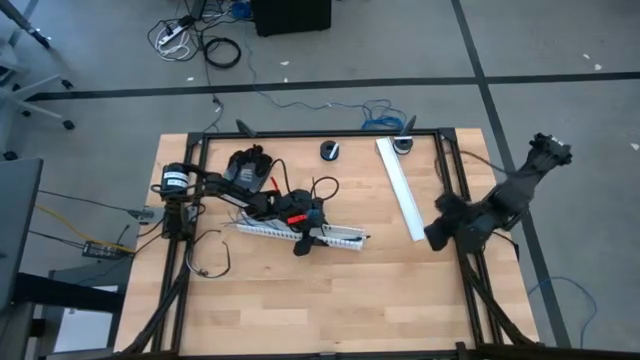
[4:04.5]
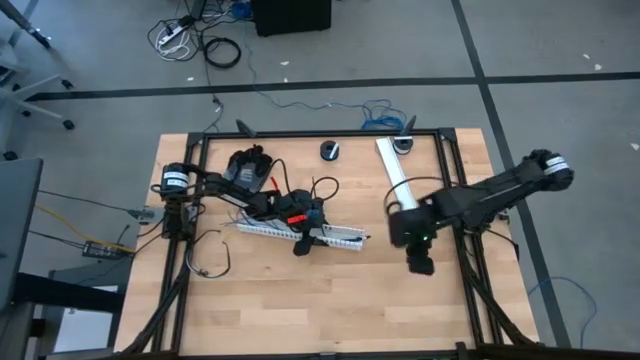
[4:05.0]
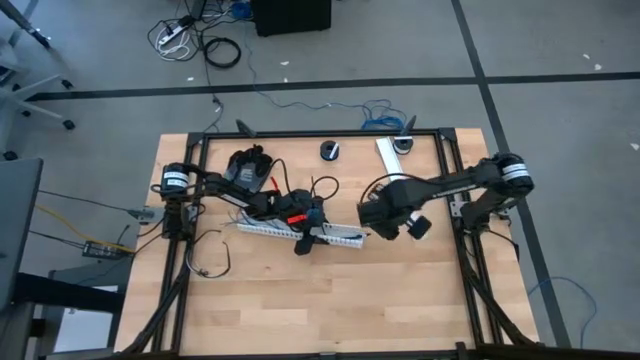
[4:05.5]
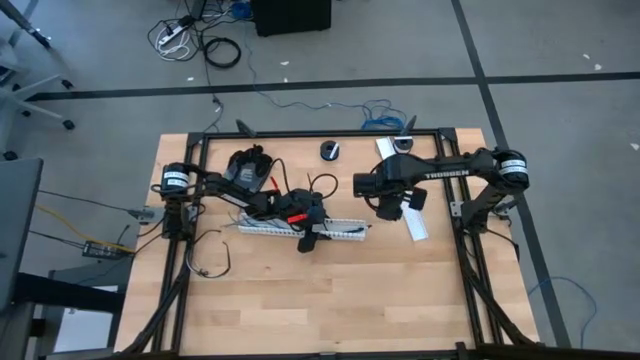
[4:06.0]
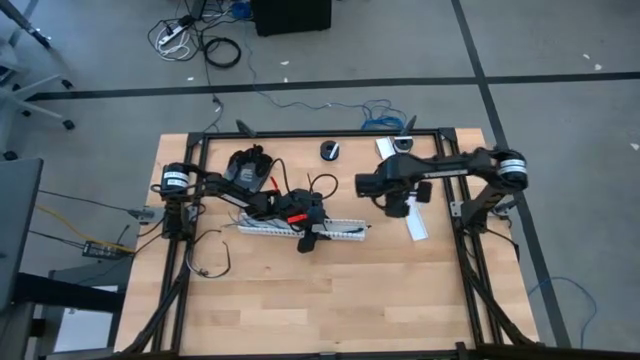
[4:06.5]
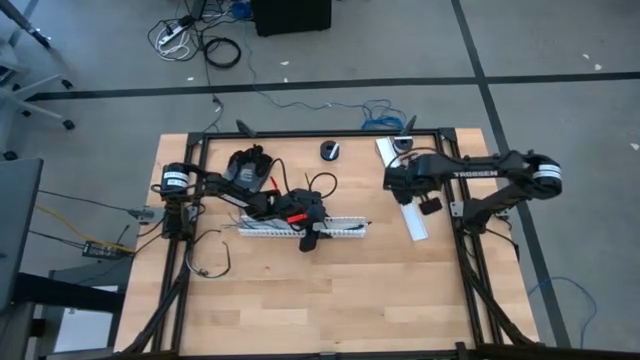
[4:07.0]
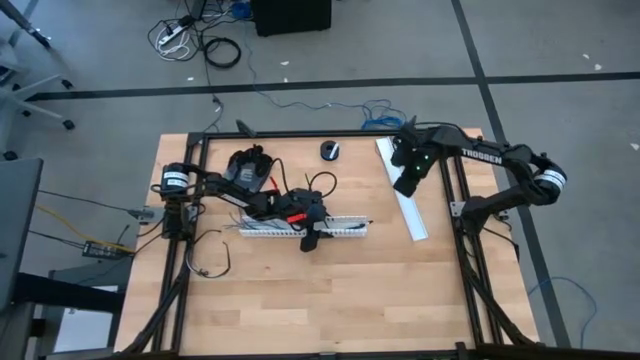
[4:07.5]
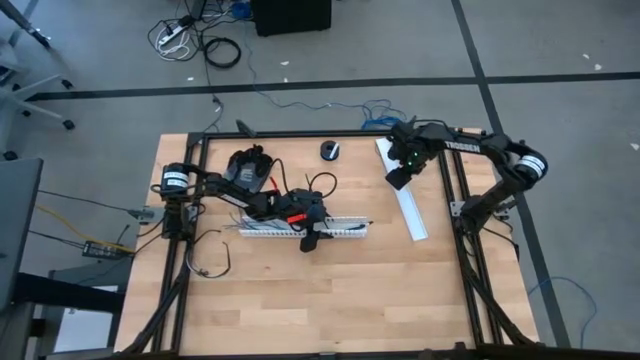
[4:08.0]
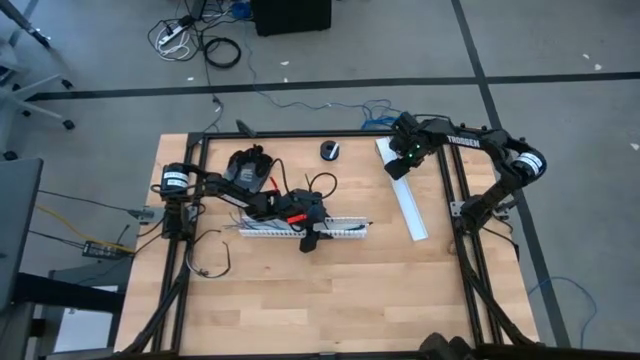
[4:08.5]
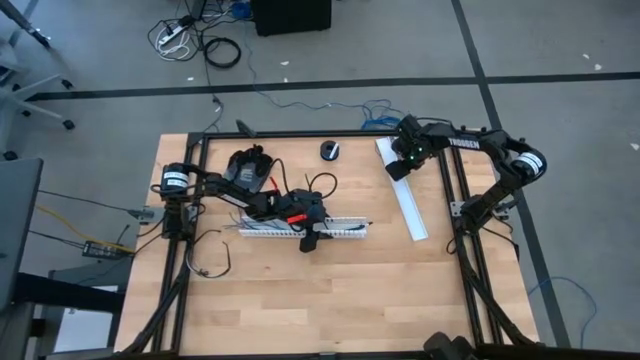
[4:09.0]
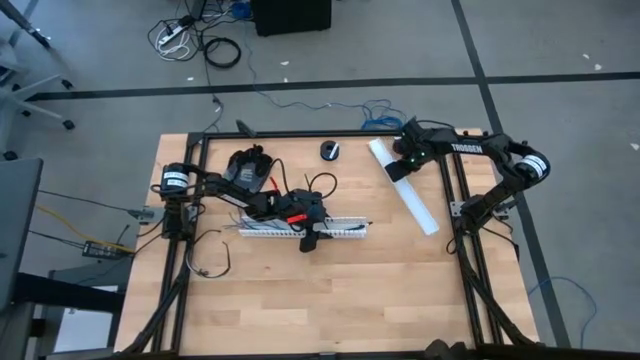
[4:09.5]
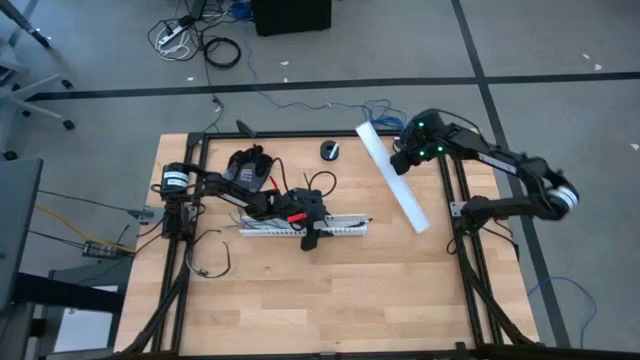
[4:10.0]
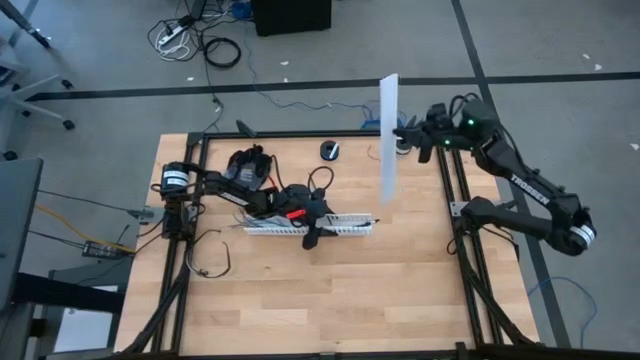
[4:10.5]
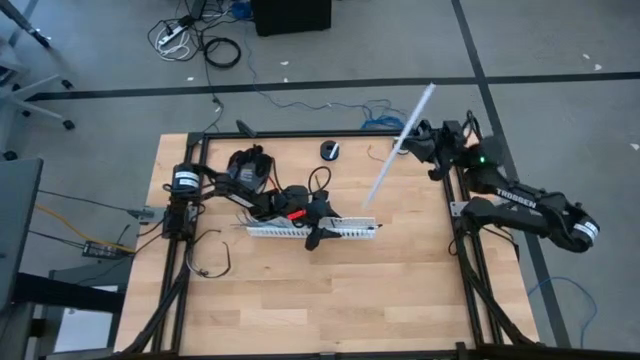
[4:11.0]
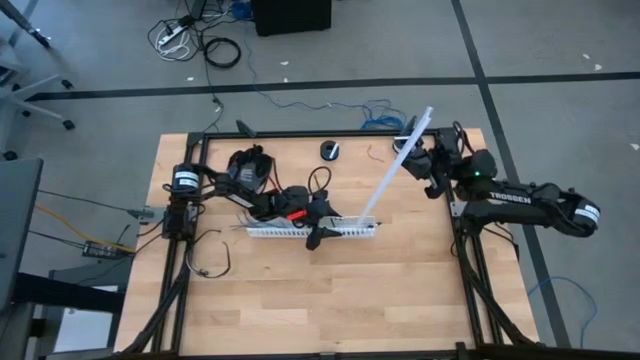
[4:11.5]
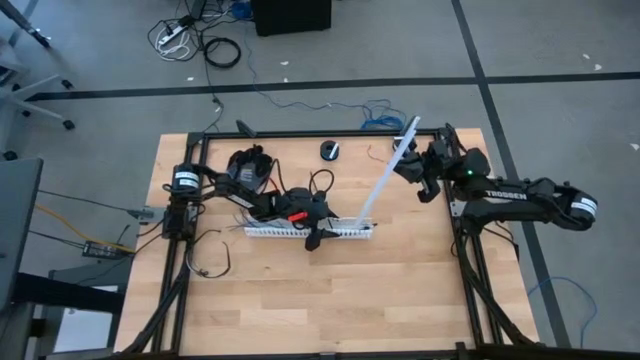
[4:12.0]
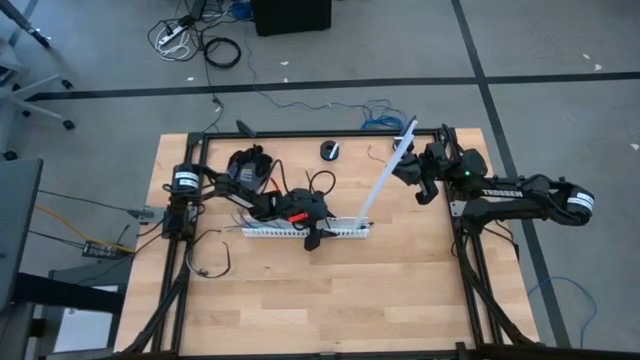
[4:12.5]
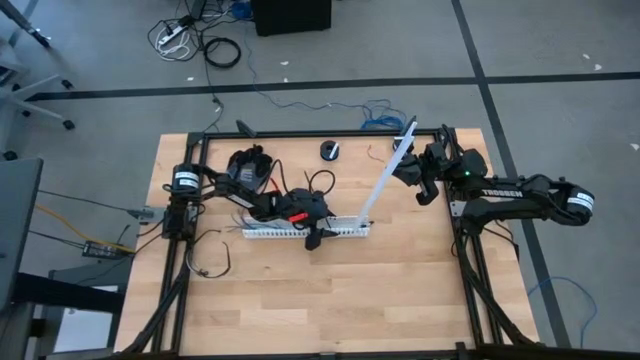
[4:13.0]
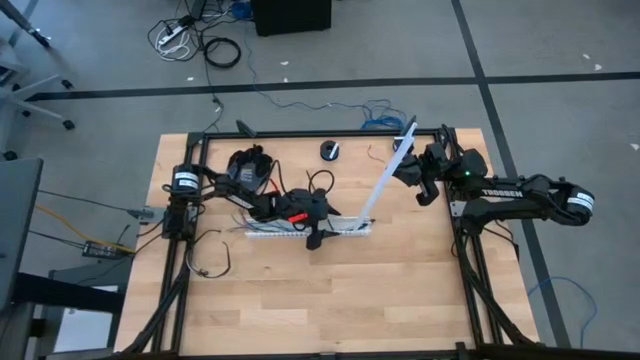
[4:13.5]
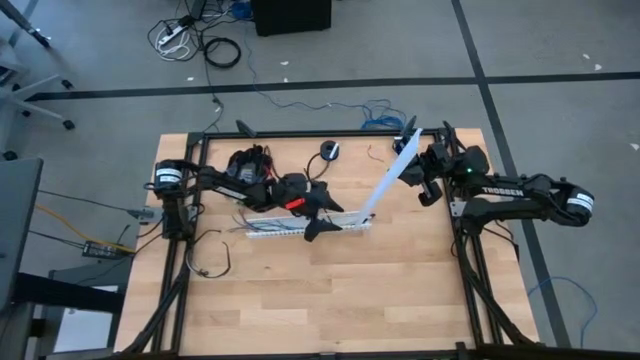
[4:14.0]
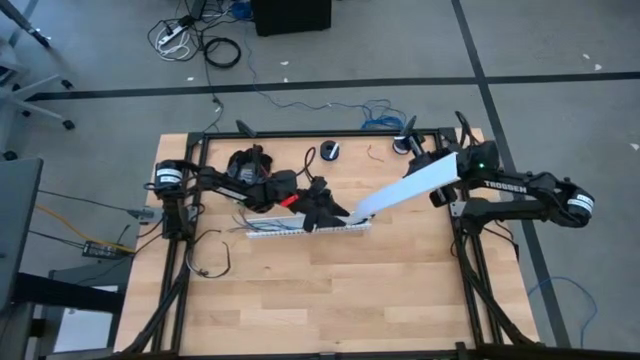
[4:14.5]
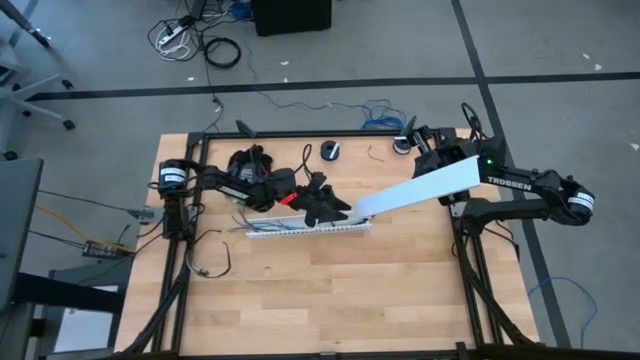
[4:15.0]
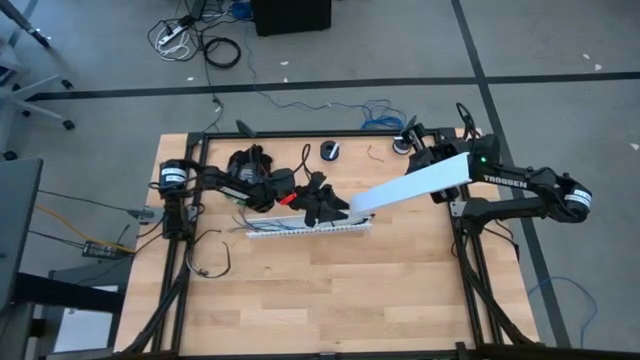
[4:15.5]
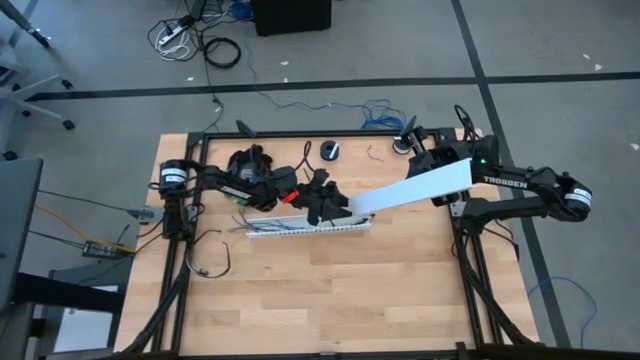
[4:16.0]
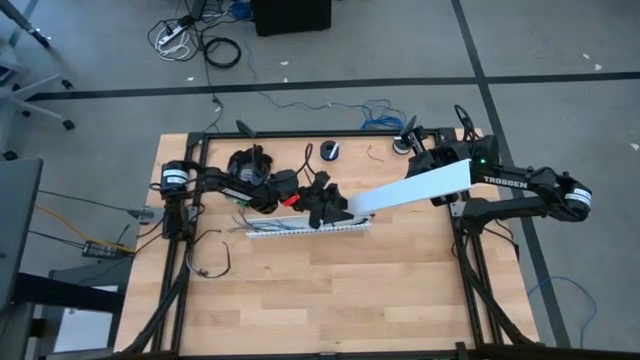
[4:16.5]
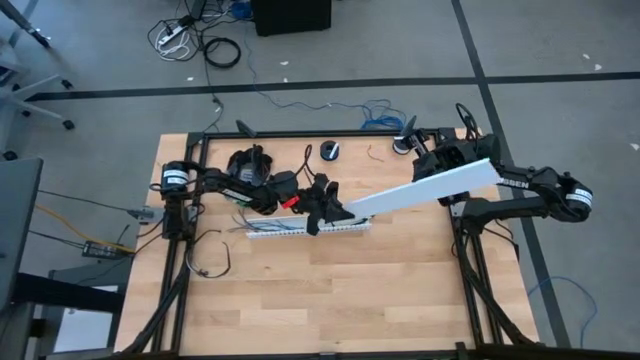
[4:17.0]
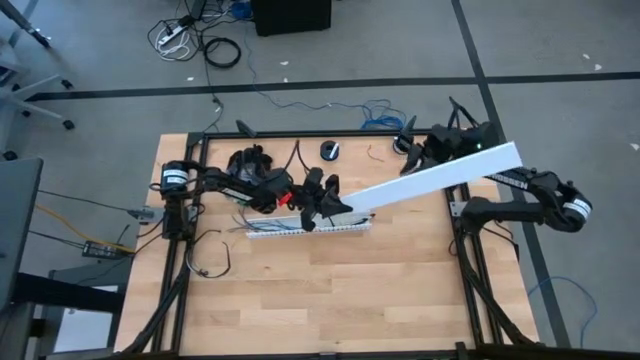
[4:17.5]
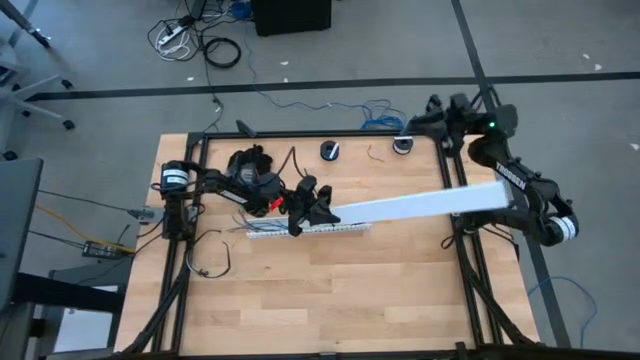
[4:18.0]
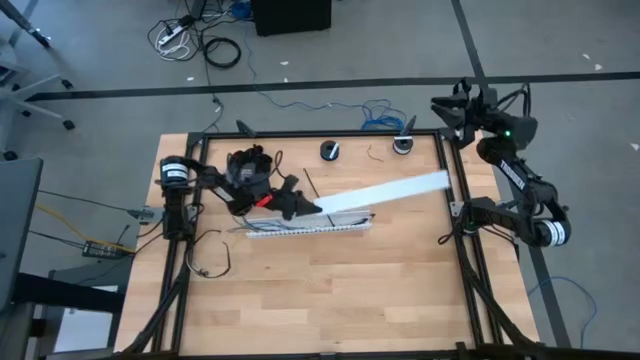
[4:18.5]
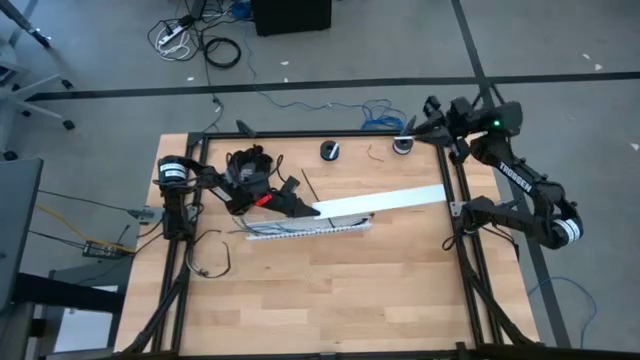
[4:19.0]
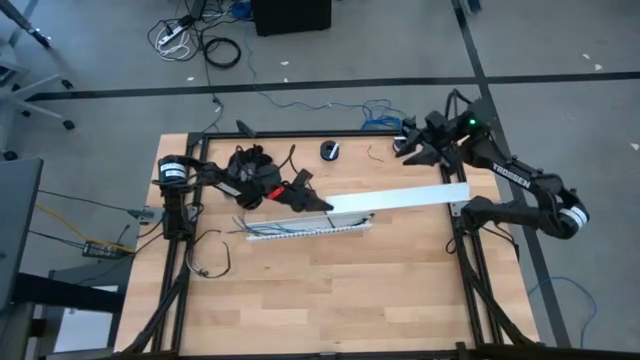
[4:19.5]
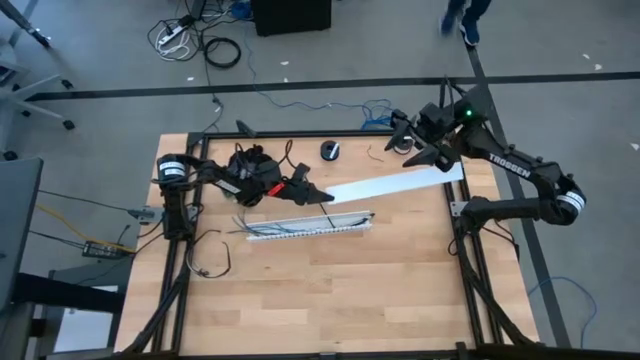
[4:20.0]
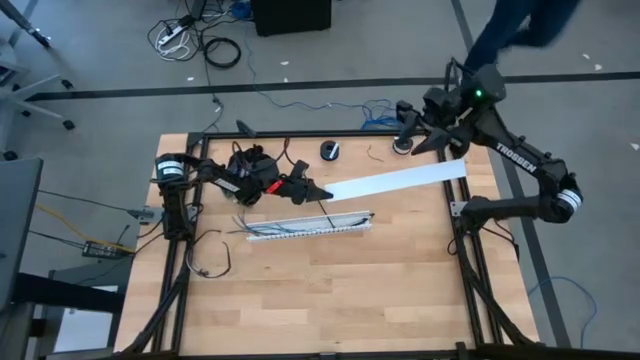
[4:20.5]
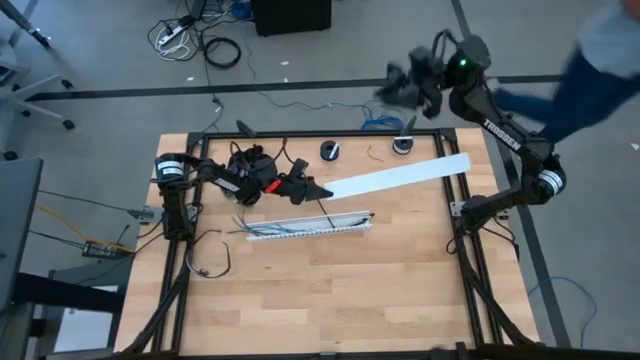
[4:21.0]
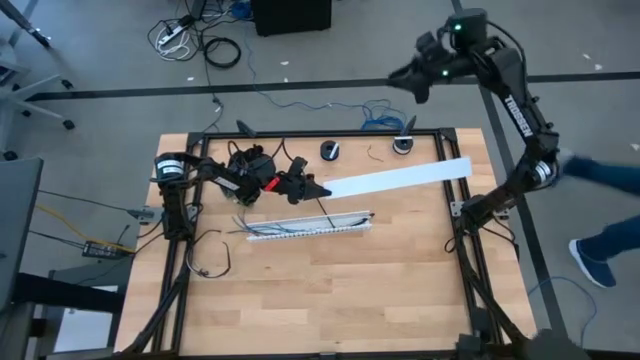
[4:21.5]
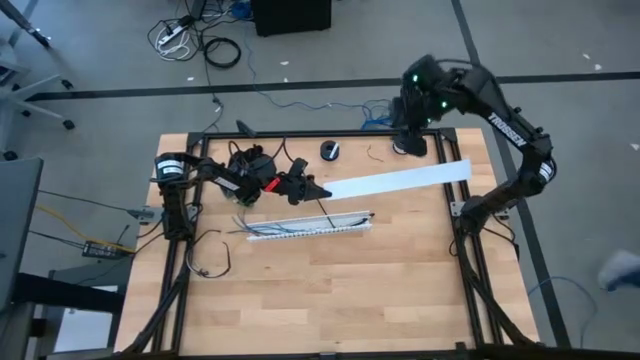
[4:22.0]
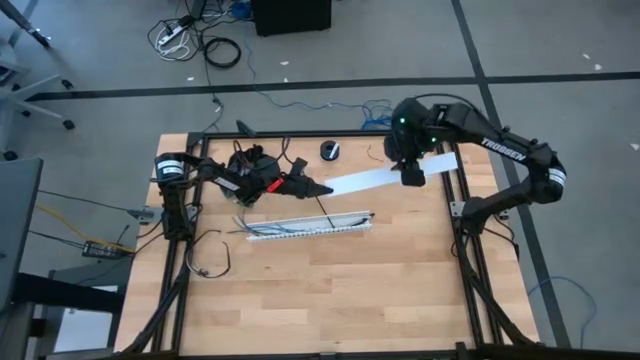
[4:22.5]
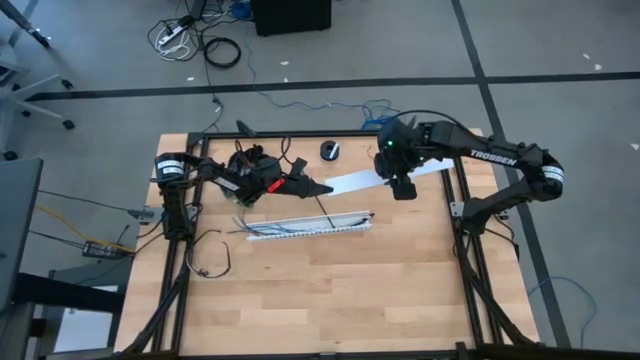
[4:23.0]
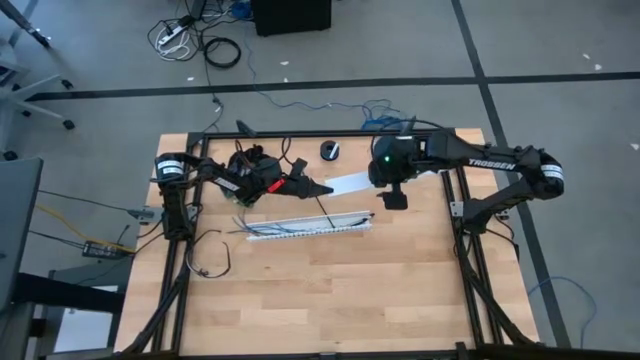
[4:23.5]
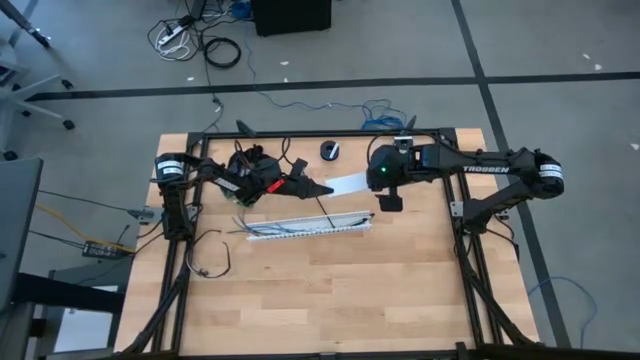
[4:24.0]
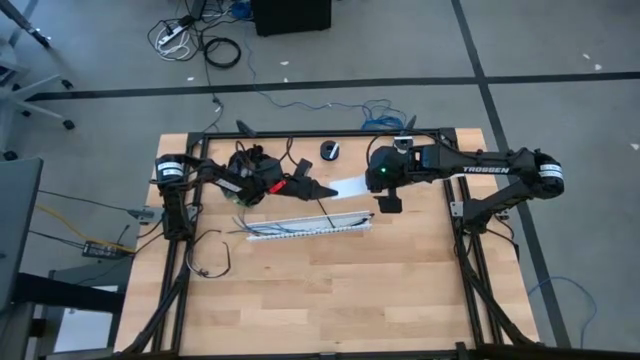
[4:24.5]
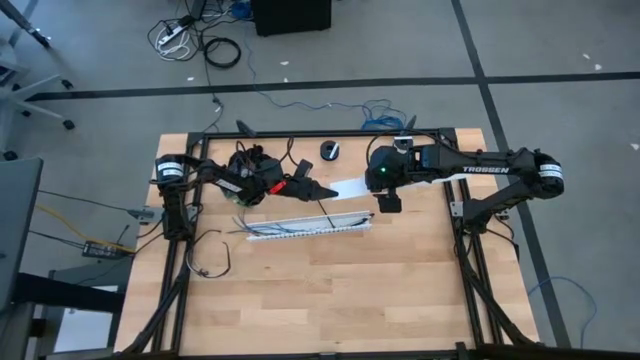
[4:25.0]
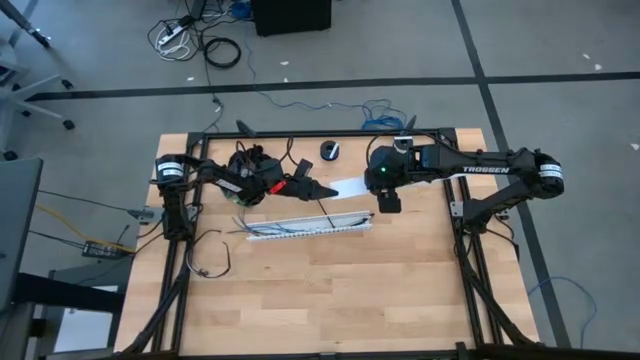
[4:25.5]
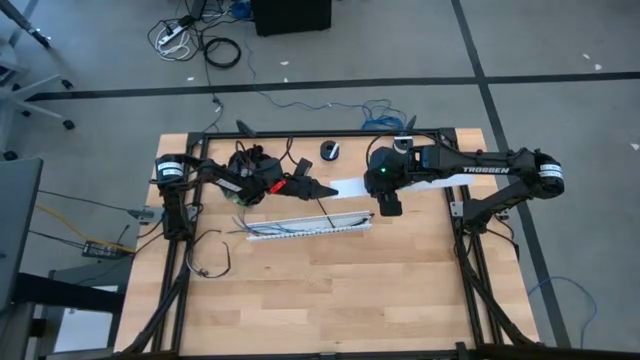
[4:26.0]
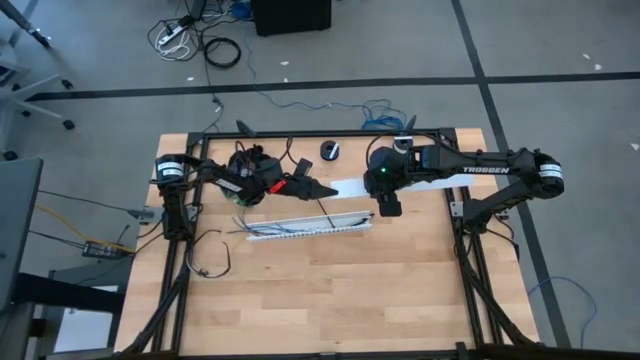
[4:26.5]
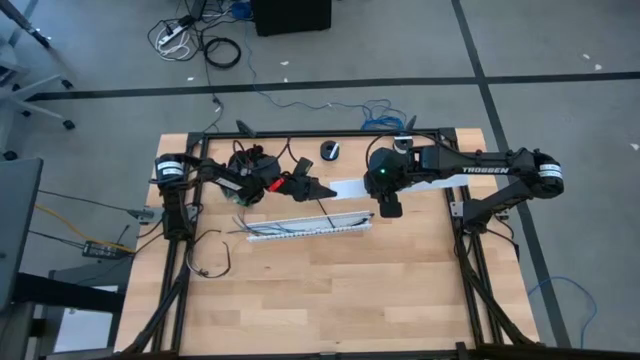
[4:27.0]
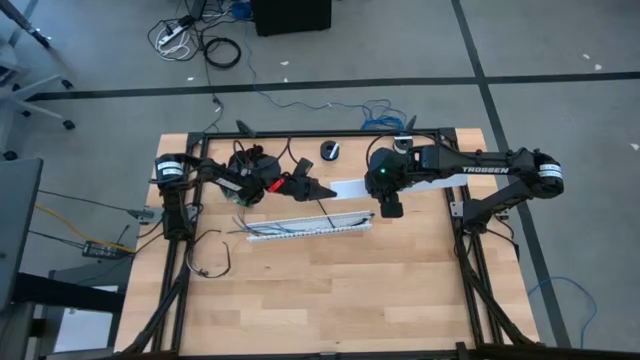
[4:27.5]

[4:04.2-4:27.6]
Task: Ziptie cables
Close the white cable duct
